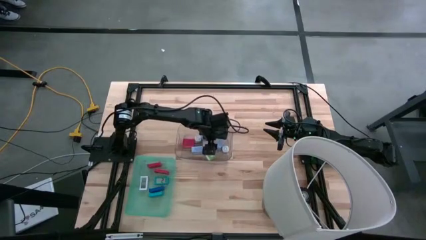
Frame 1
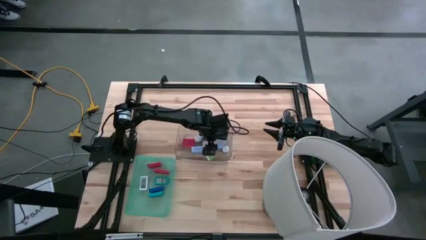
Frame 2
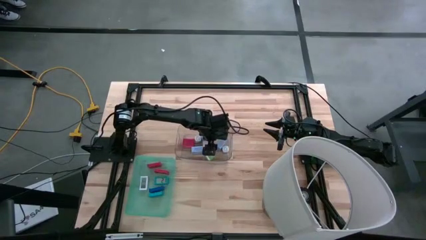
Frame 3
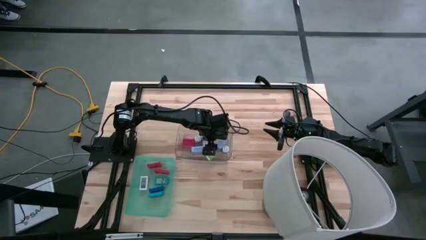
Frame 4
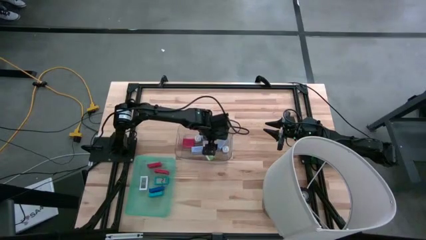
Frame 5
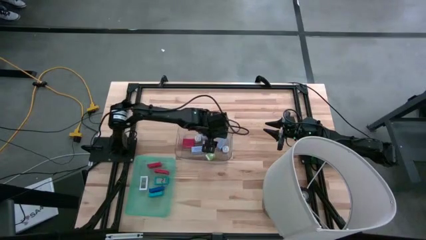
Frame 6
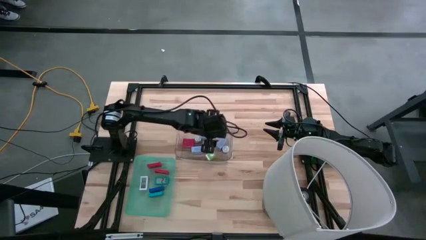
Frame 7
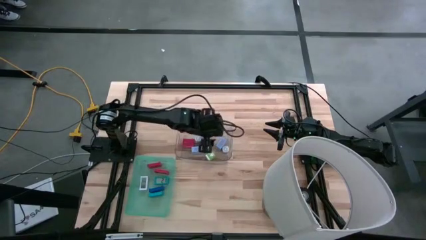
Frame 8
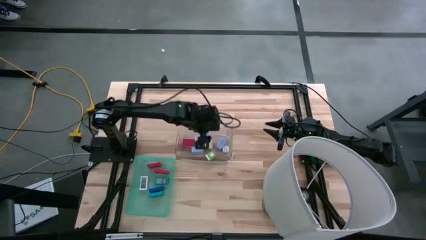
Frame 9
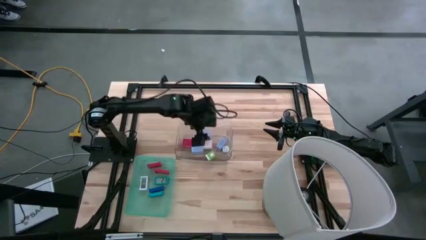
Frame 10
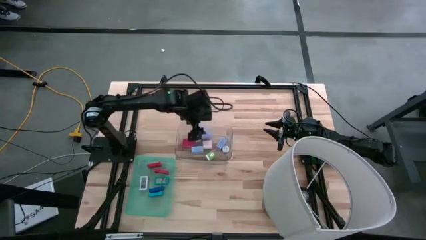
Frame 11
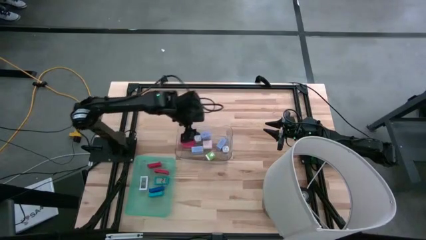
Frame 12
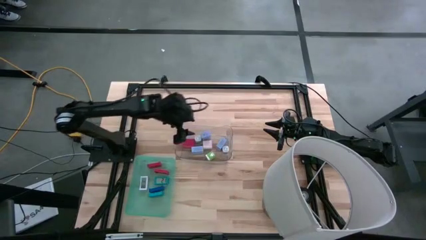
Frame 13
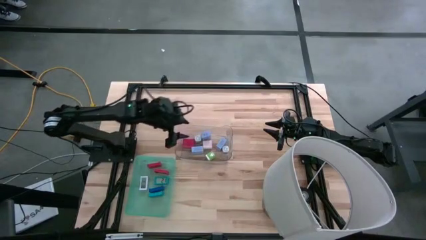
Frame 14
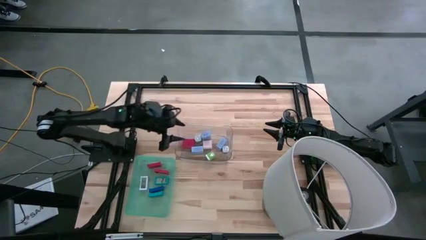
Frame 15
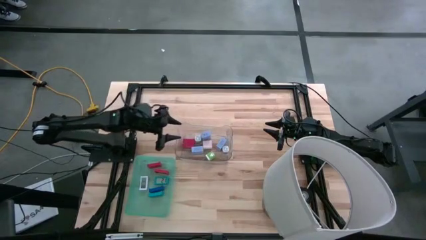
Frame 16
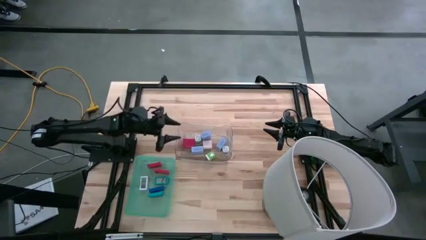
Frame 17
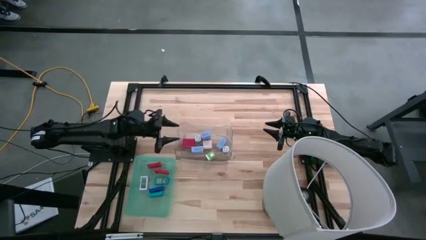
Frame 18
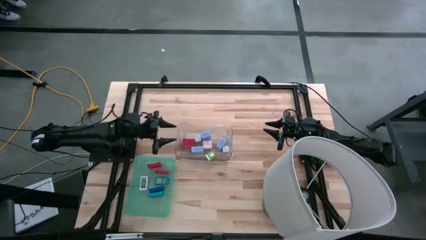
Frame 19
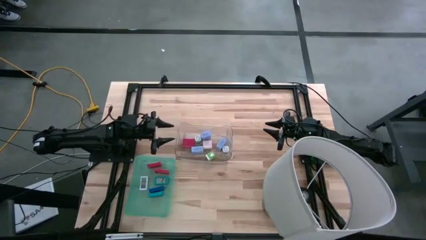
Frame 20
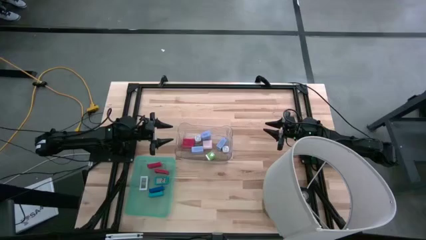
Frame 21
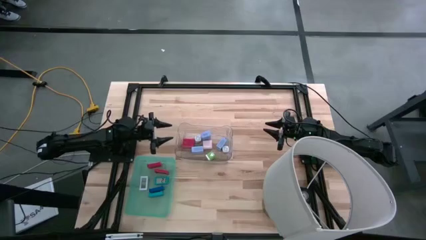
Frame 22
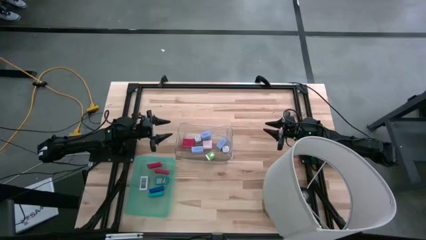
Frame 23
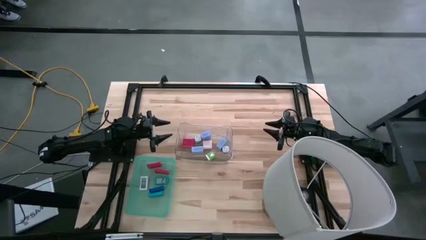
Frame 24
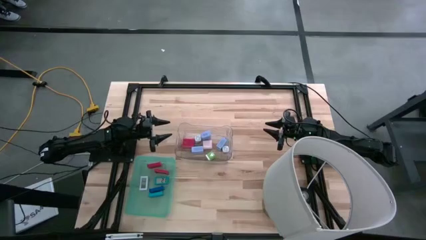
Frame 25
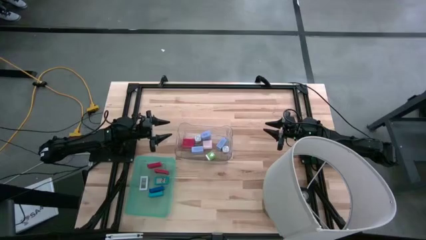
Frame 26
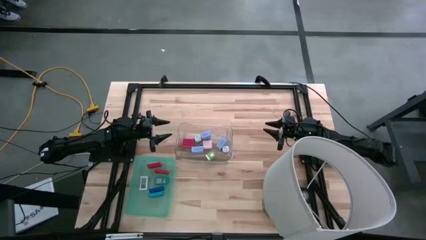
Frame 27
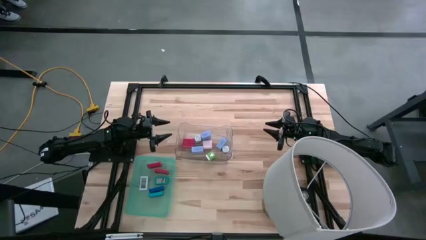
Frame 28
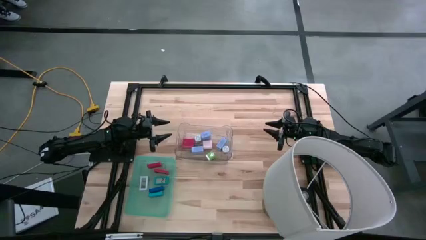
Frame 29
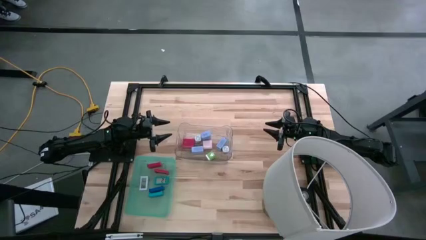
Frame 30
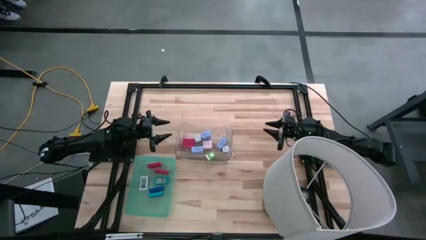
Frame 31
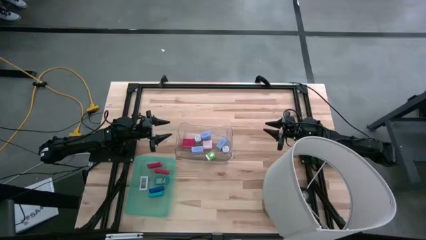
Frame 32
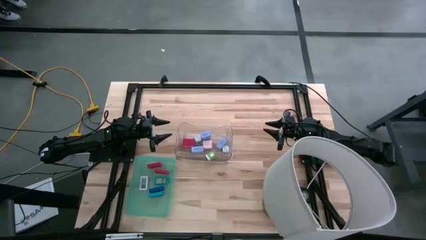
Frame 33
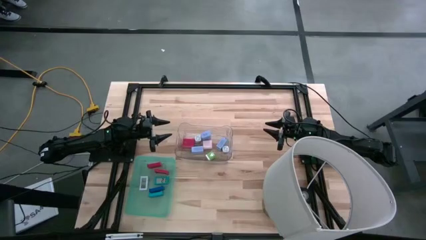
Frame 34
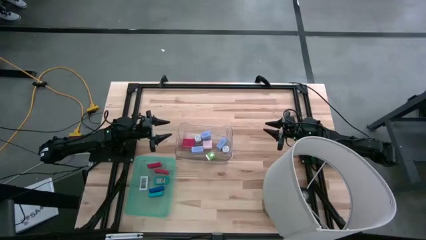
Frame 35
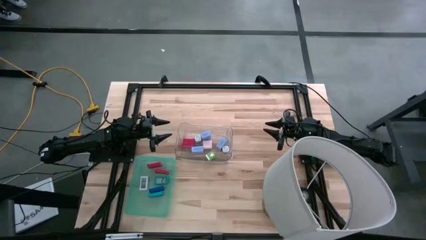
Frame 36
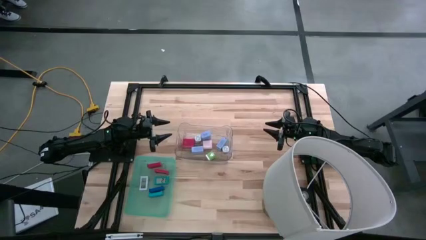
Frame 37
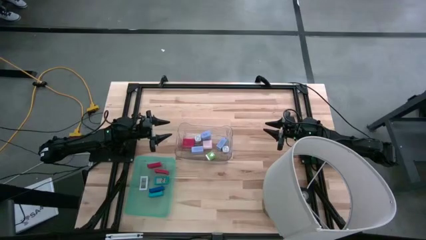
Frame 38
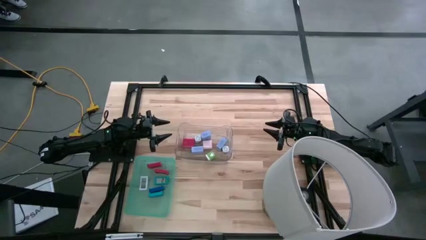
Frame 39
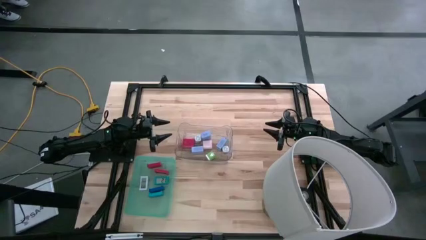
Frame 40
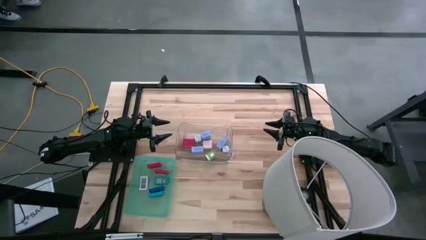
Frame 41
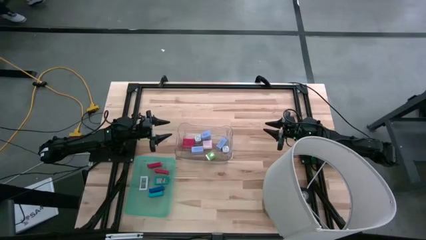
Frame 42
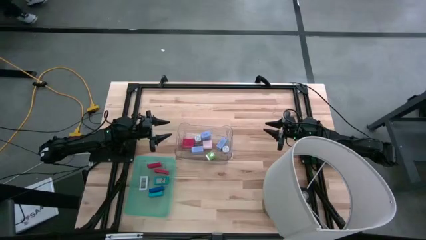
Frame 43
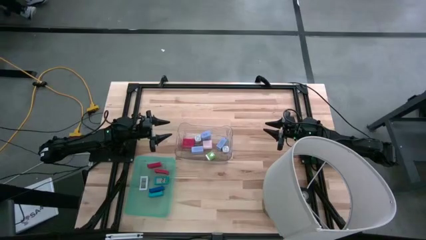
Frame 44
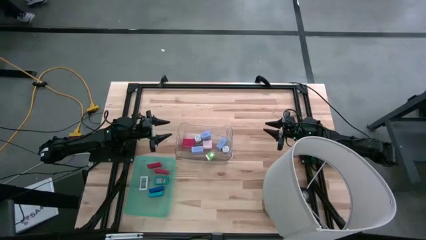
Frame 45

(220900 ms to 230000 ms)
Task: Pick & Place Office items
Return to Home Position

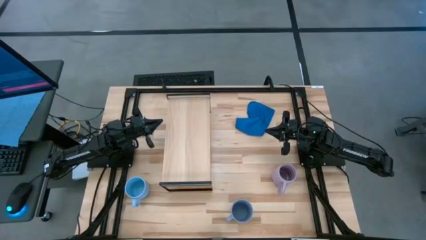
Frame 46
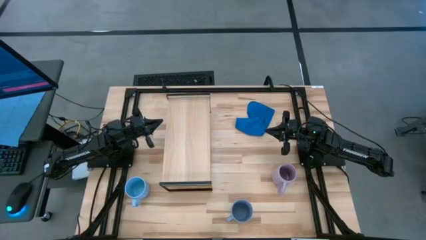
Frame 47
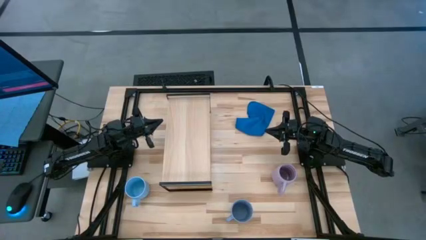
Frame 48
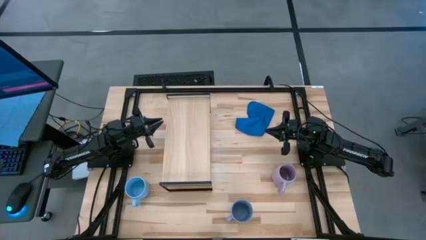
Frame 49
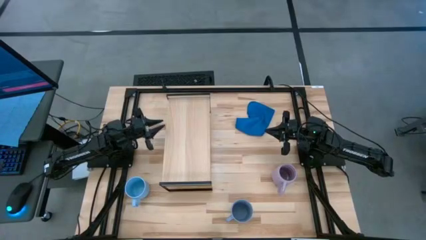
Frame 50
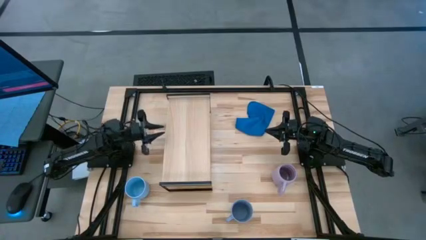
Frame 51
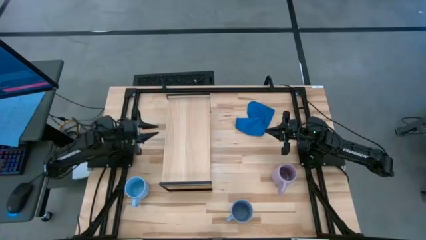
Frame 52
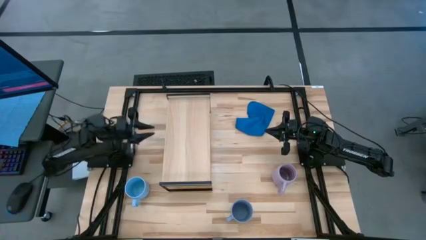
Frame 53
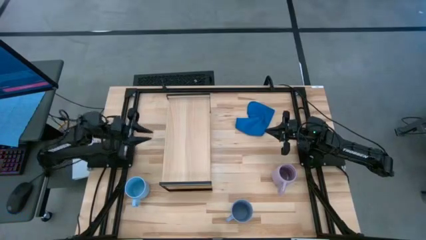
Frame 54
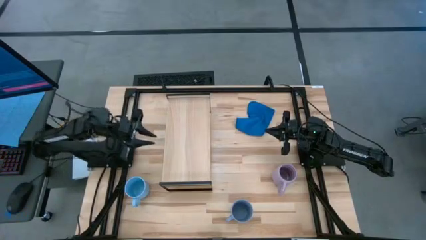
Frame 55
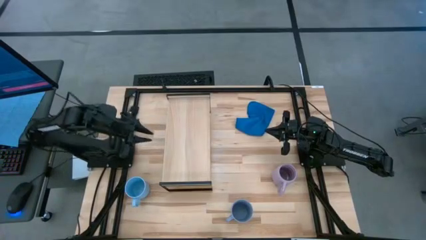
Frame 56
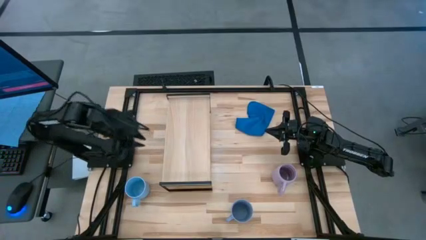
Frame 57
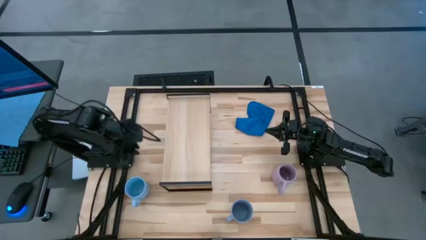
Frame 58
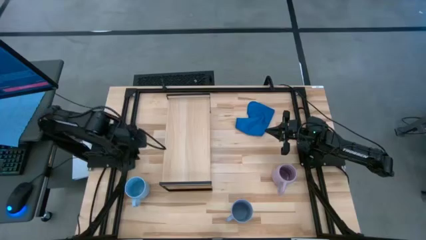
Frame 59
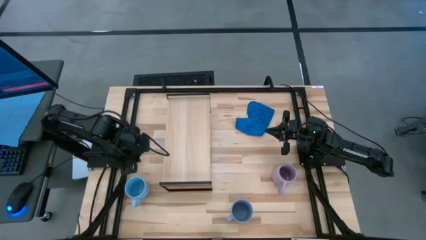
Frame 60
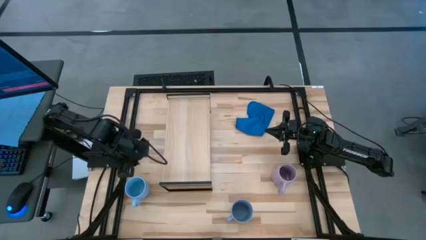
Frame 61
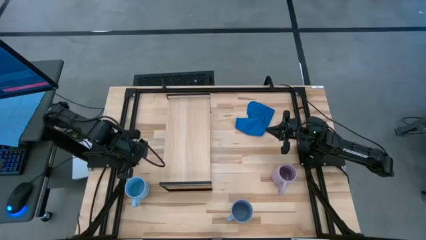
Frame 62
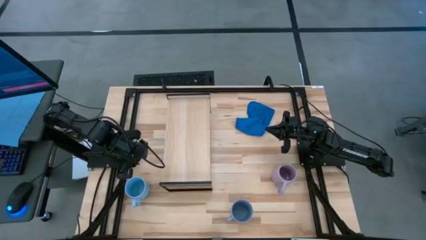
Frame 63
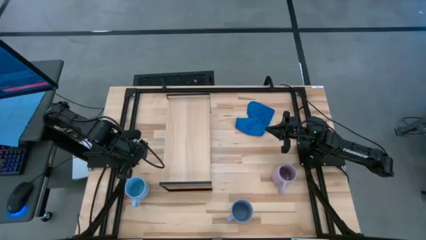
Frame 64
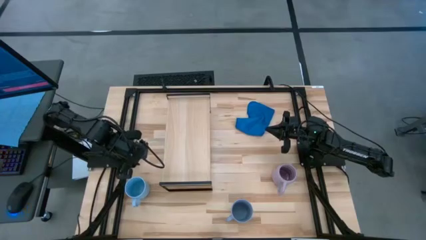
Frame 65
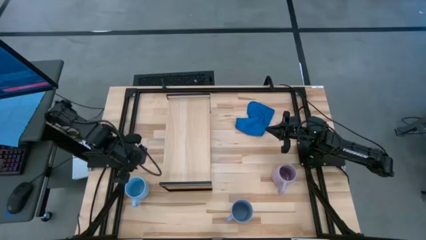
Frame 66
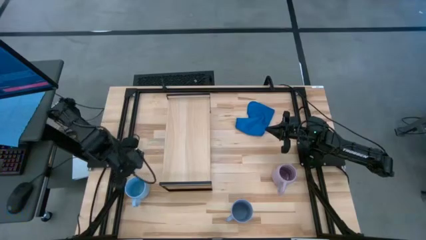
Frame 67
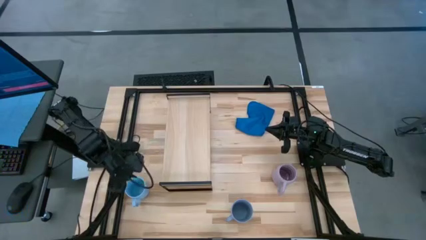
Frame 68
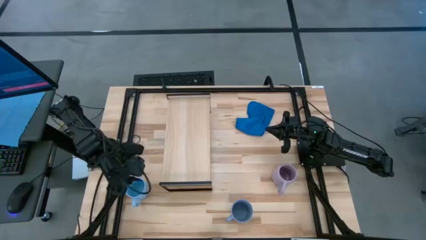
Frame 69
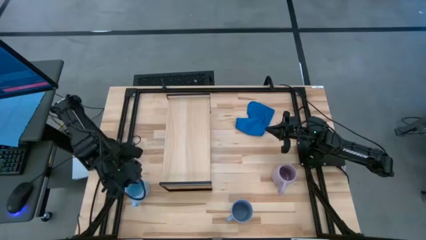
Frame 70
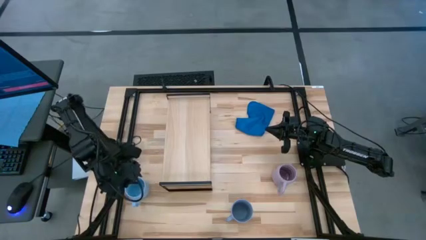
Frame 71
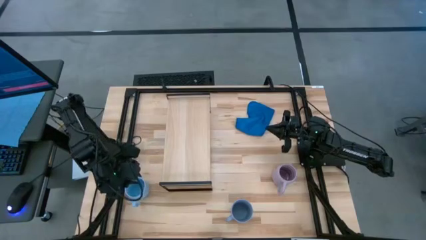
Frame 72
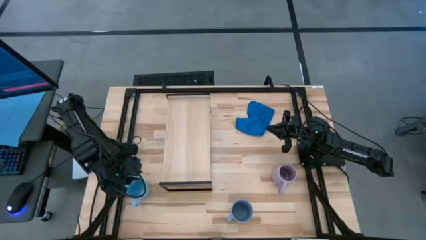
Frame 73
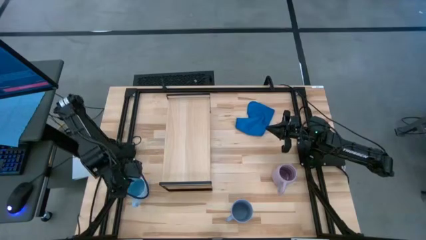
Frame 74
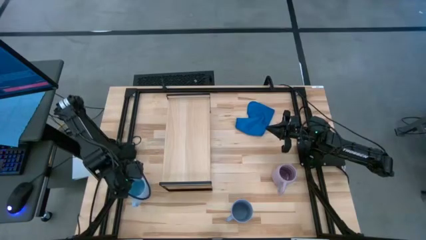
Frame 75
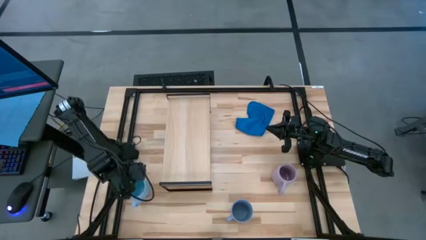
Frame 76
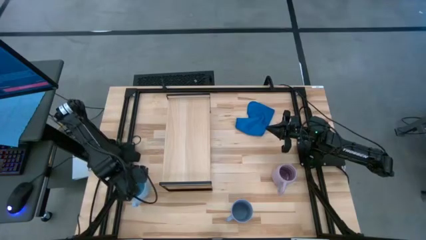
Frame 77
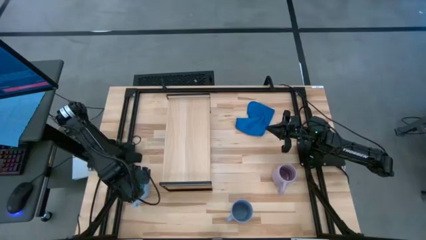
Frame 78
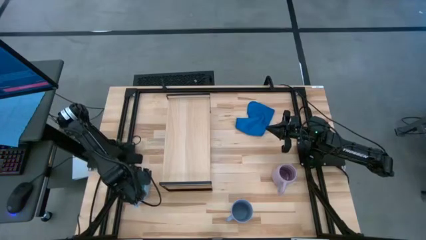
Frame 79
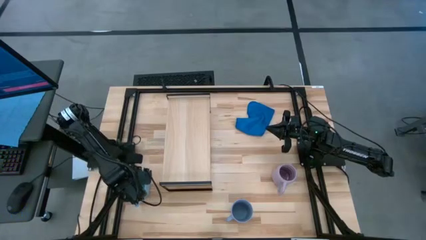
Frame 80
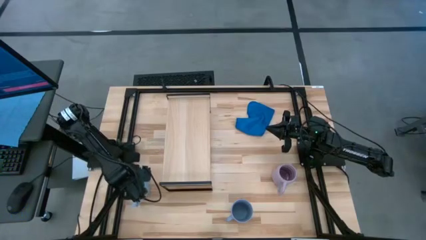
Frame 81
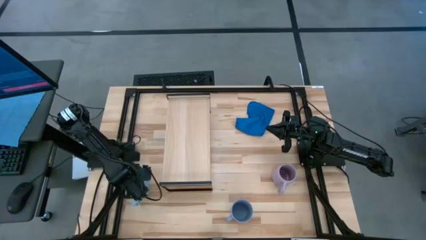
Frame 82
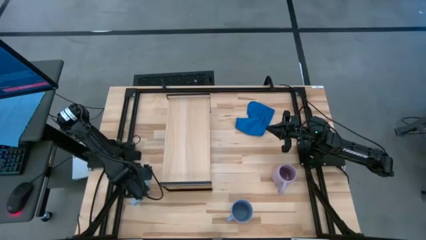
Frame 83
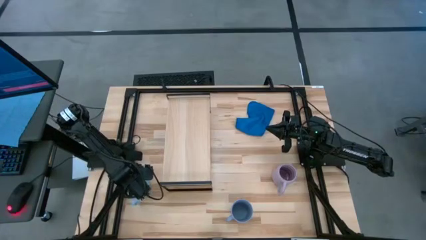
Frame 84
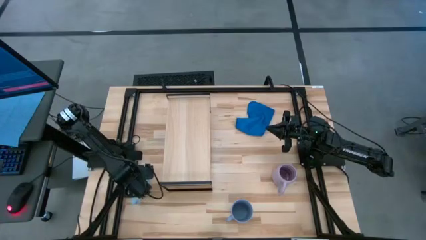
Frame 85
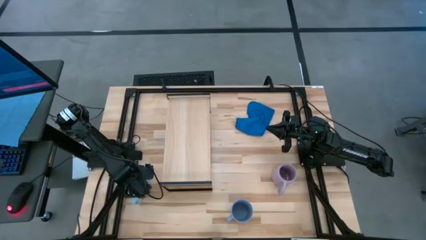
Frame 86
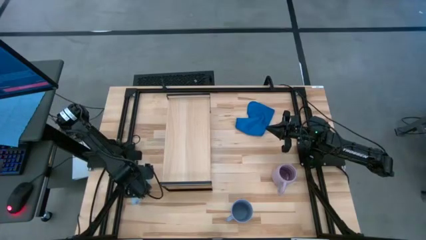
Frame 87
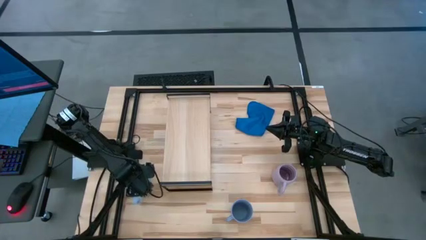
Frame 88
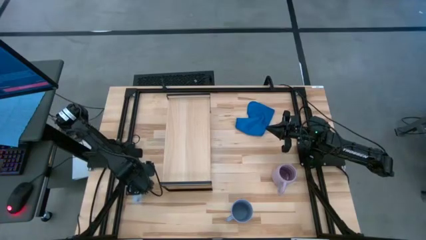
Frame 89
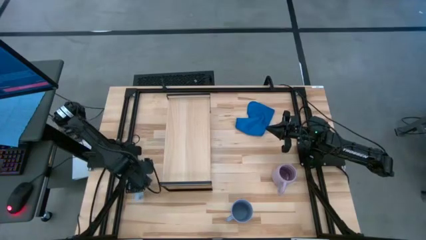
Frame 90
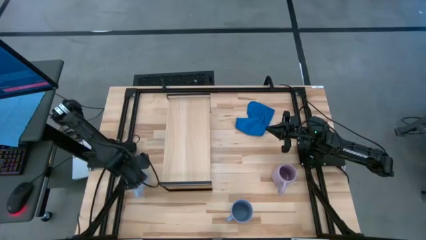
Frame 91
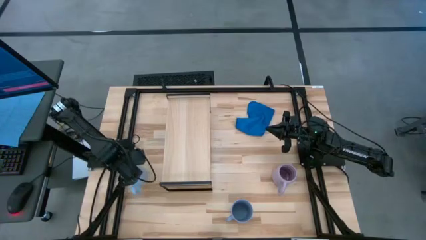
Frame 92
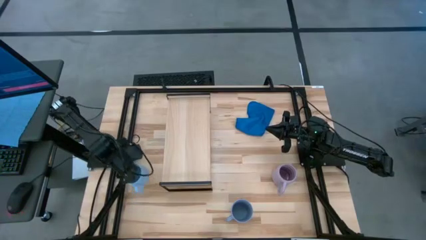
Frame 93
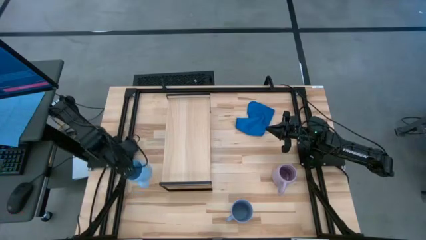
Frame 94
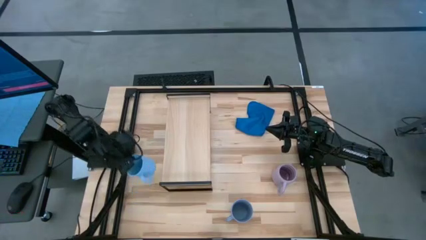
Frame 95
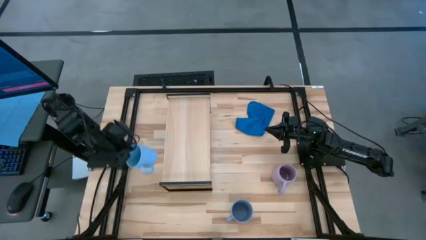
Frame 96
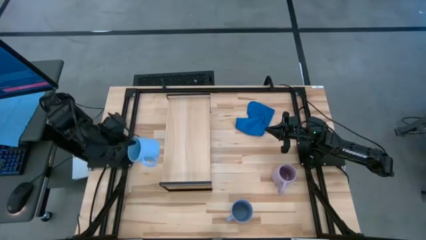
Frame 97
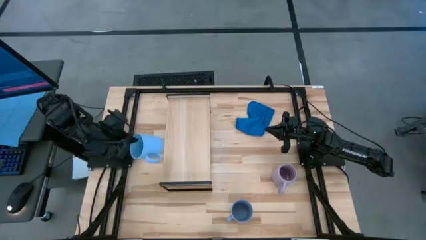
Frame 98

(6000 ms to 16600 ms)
Task: Stack small to large cups/mugs on shelf
Put the light blue mug on the shelf
